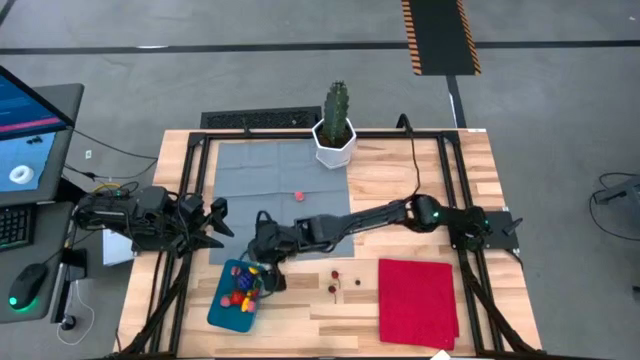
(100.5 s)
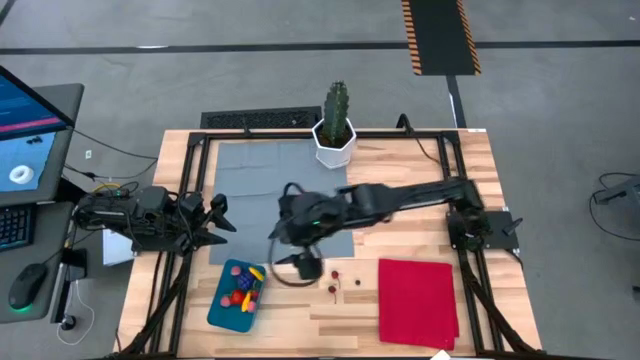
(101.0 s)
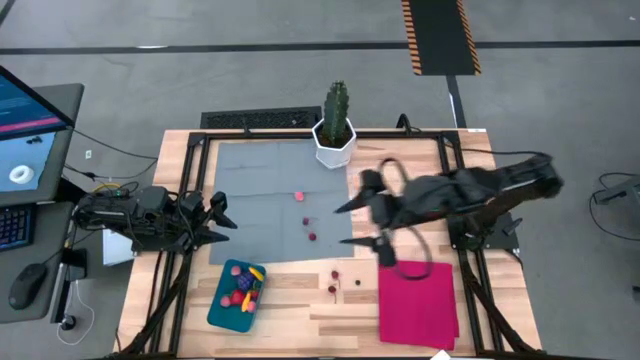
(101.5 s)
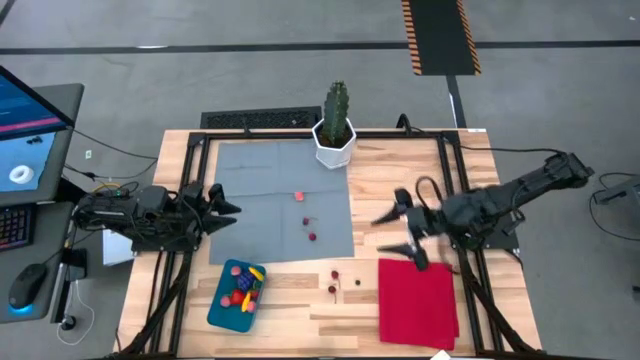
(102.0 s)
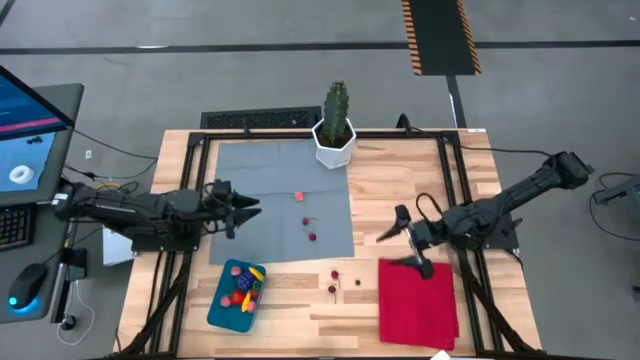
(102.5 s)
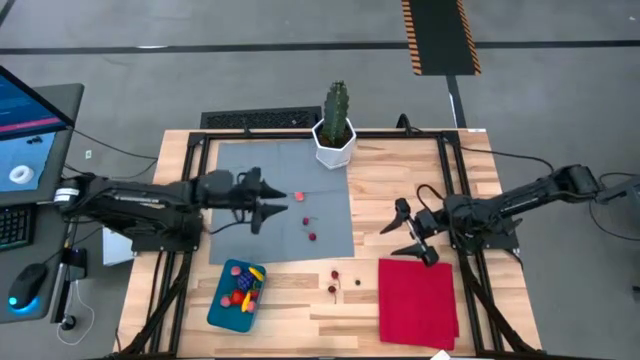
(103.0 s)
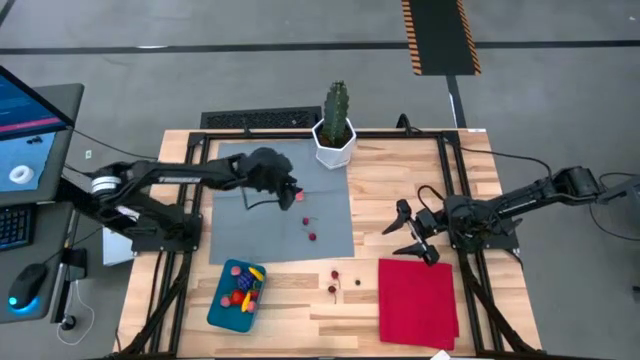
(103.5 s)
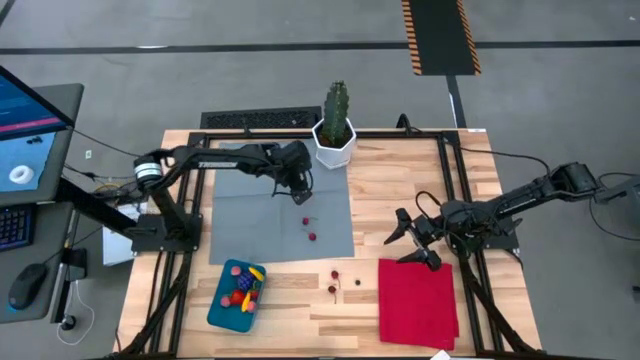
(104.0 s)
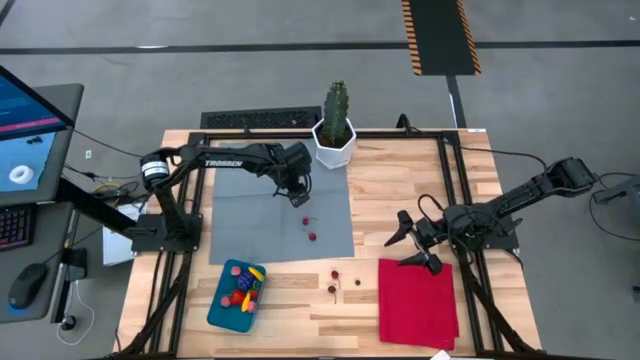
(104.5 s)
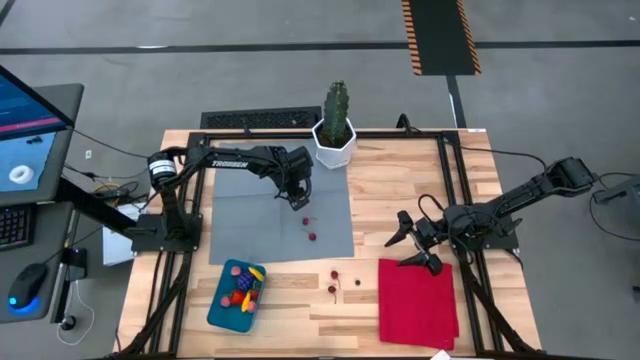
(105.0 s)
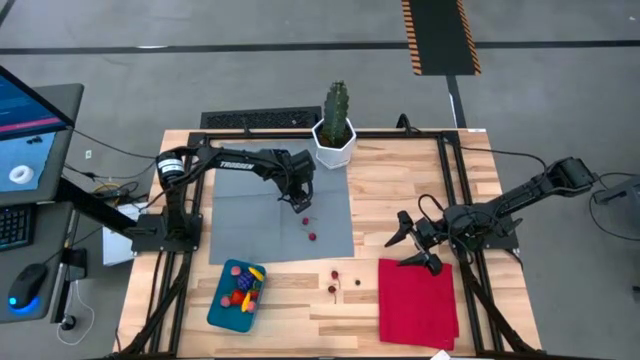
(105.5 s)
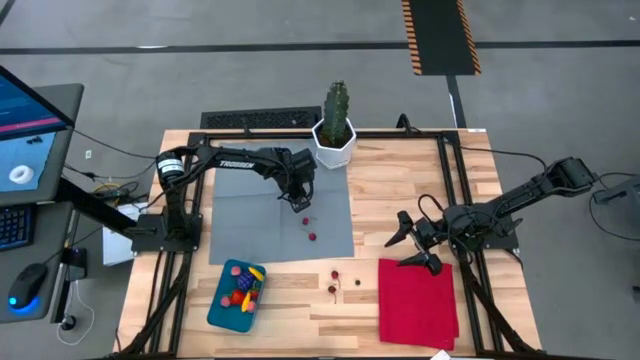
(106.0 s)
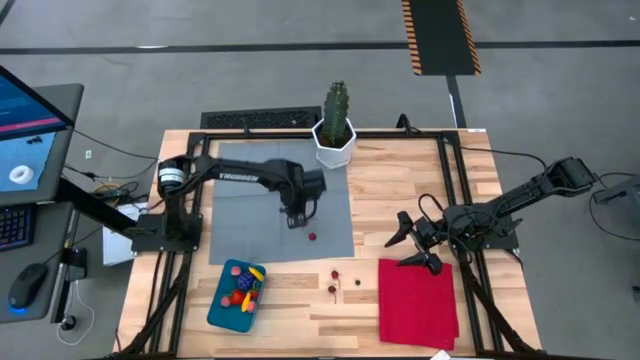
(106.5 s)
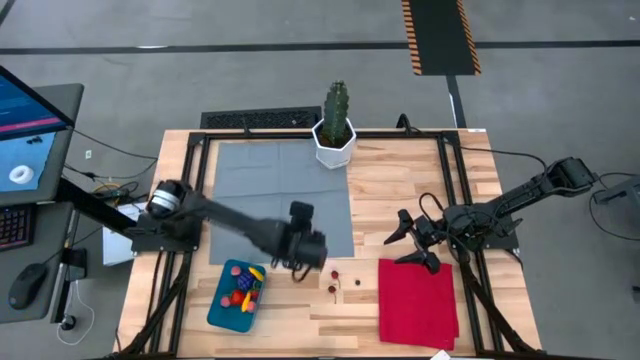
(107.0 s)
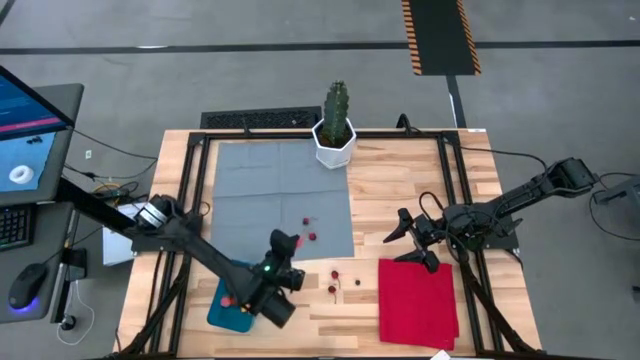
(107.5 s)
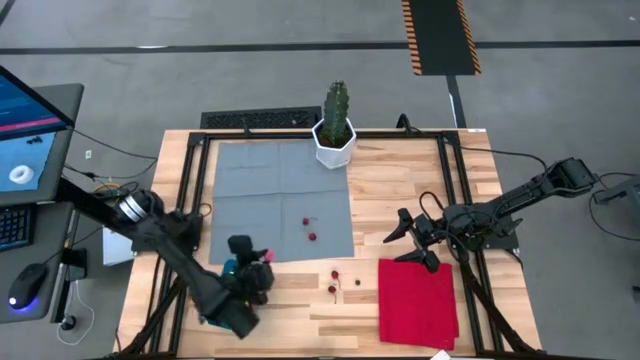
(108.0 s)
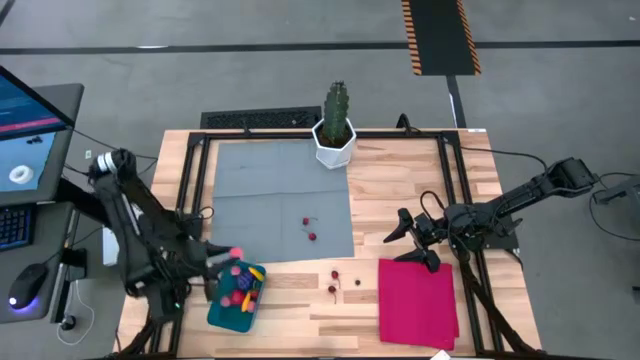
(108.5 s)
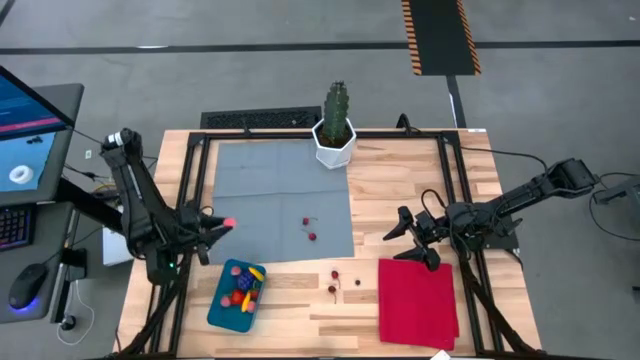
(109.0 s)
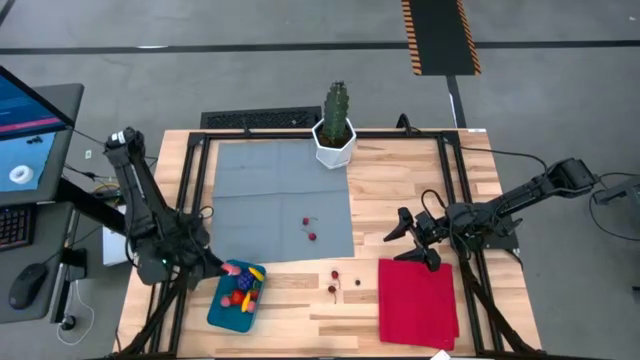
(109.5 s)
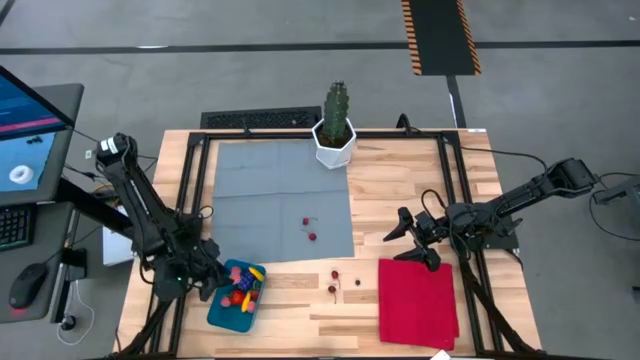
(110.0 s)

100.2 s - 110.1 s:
Task: Pick and placing Produce into tupperware
Put the peach into the blue bin

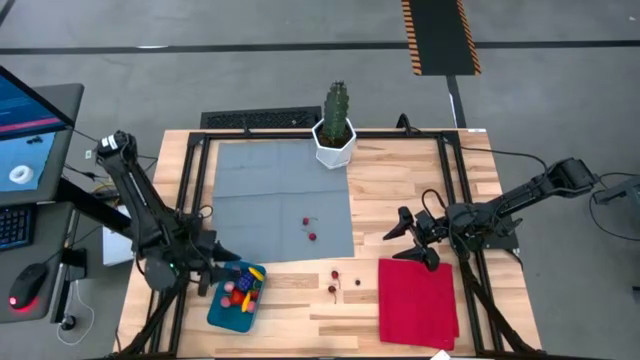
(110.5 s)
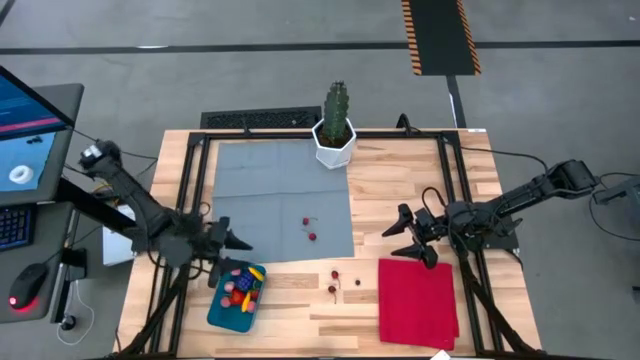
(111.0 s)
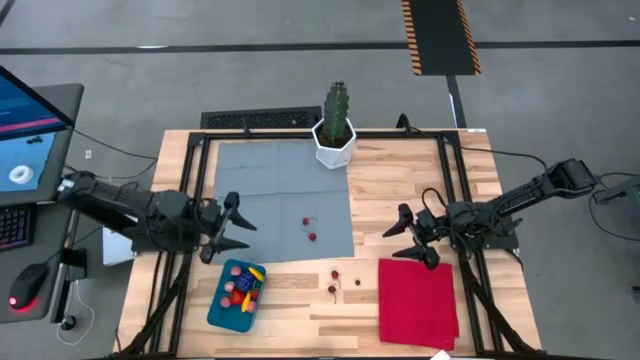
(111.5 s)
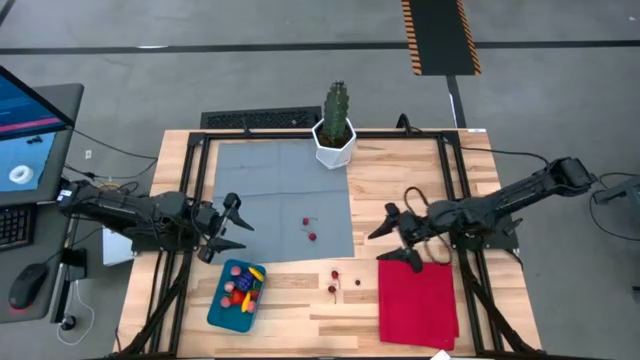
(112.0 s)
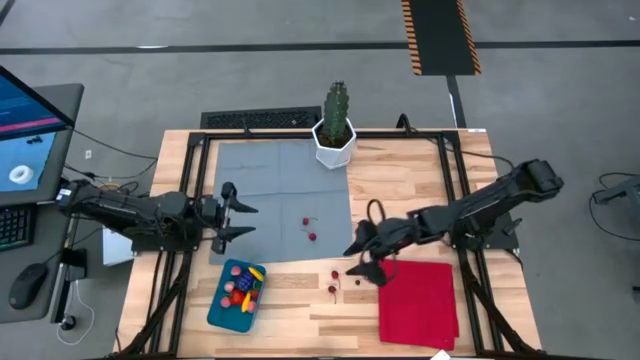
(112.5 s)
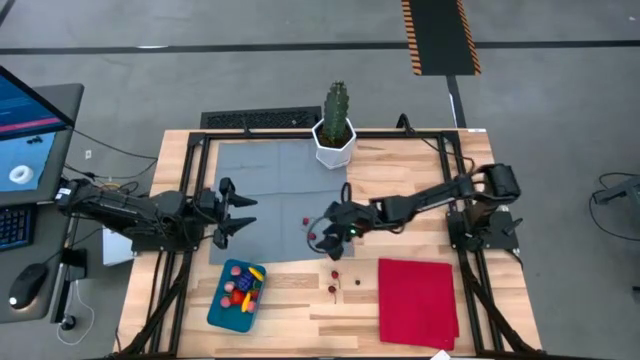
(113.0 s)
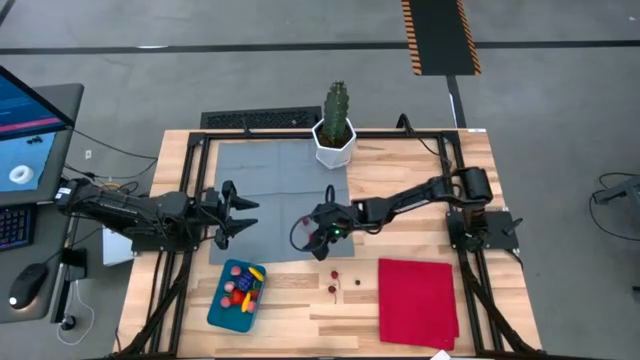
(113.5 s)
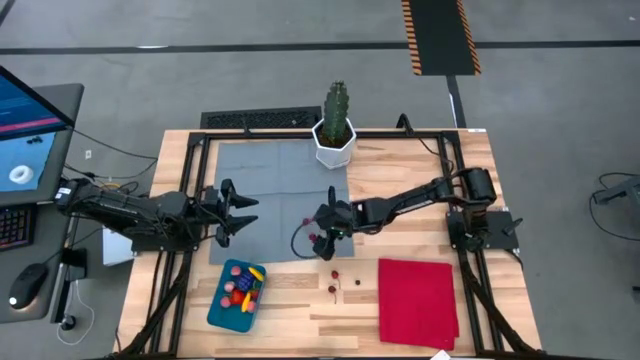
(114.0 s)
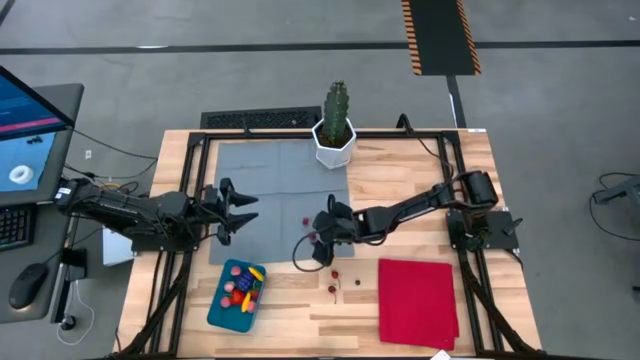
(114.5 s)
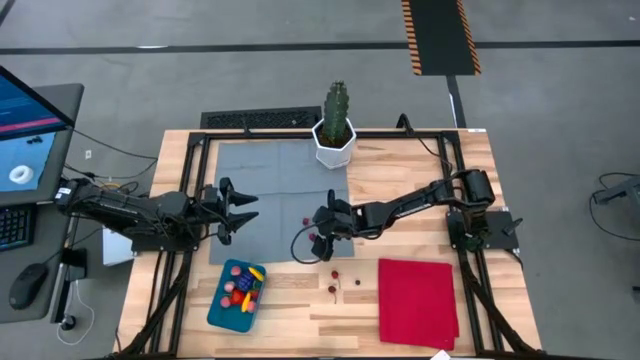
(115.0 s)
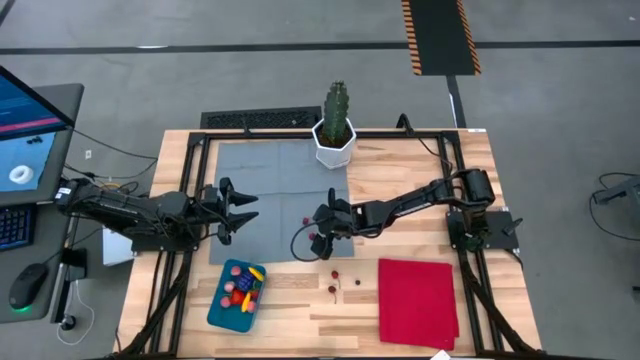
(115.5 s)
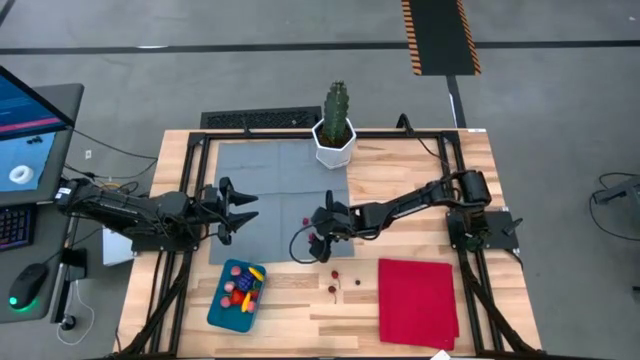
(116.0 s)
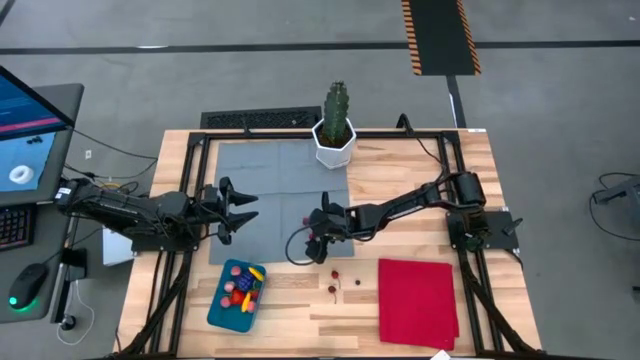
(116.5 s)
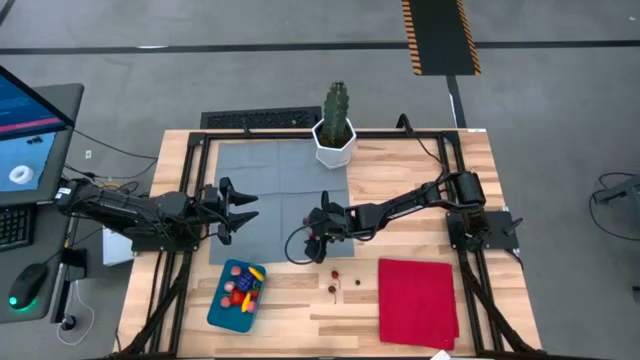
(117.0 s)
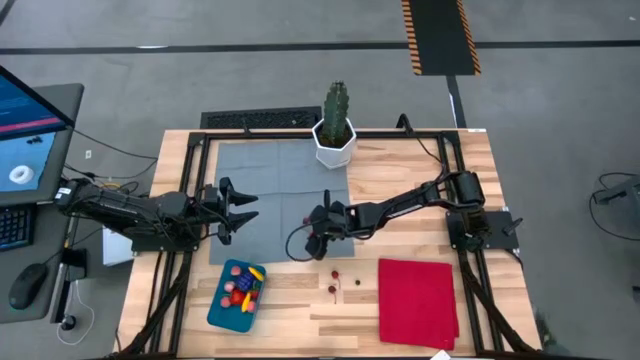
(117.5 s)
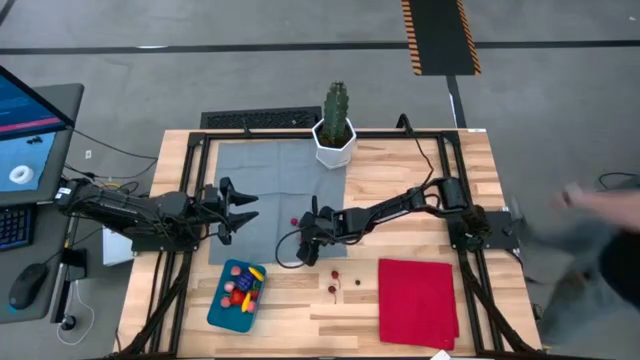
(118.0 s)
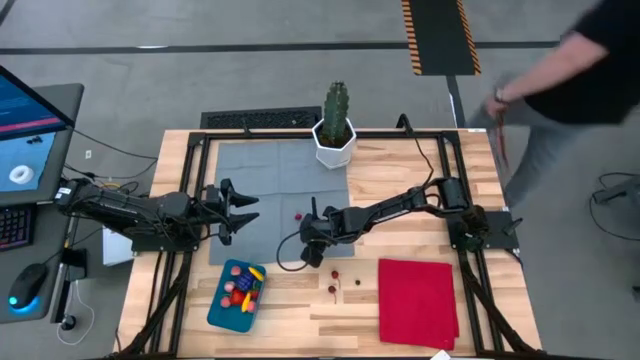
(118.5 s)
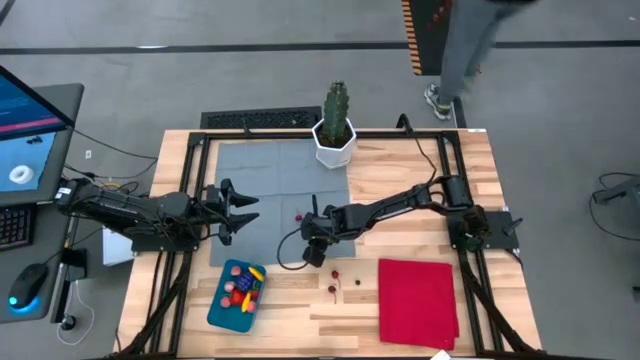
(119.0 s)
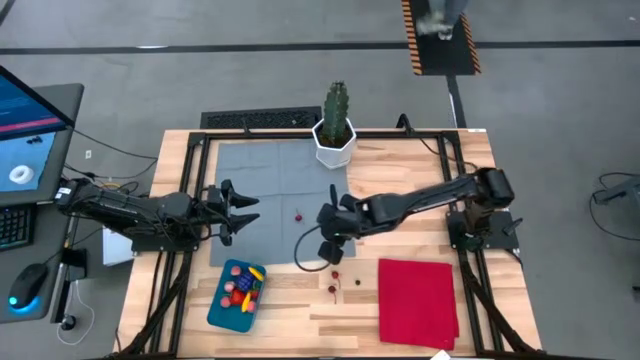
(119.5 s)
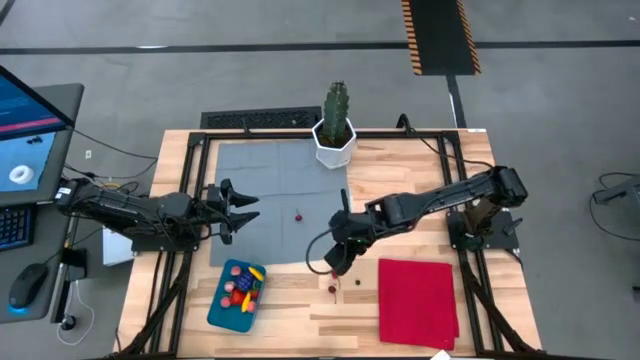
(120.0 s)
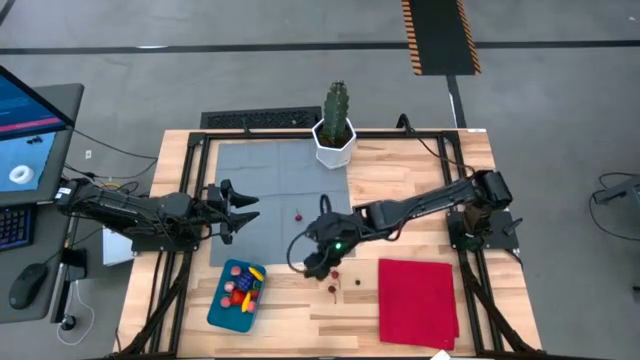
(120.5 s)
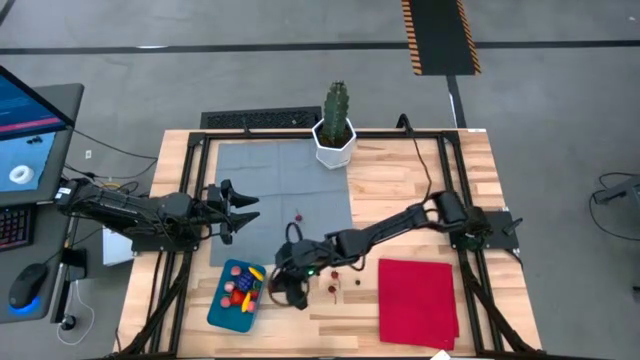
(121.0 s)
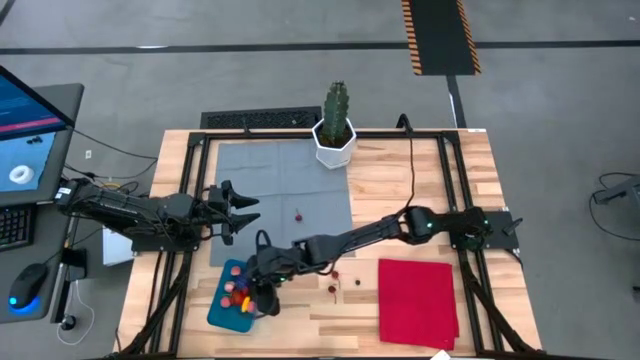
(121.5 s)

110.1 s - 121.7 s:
Put the cherry into the blue bin

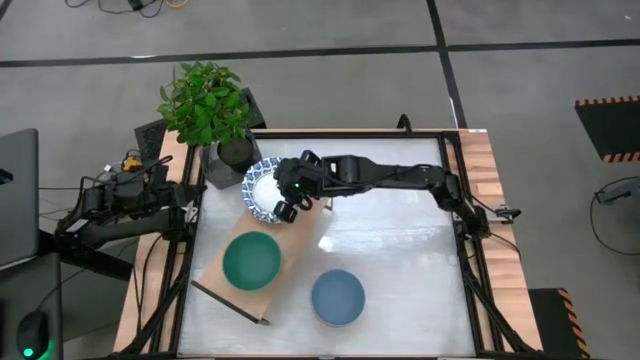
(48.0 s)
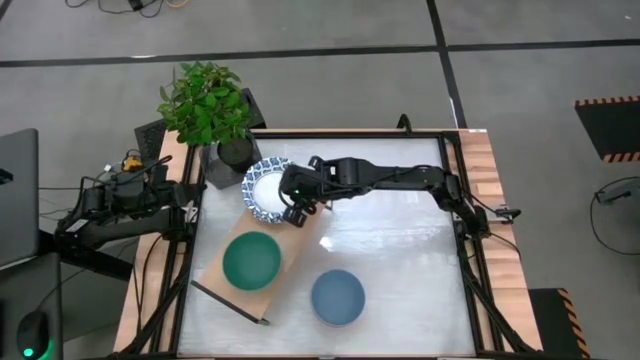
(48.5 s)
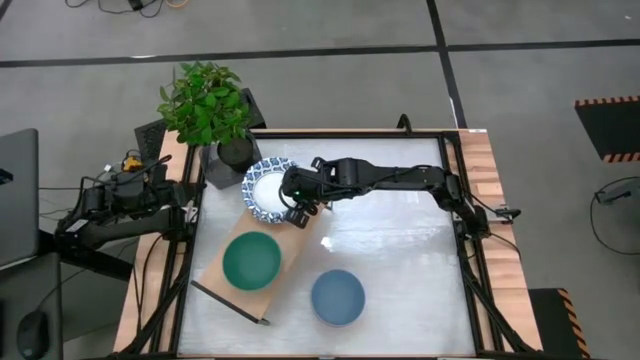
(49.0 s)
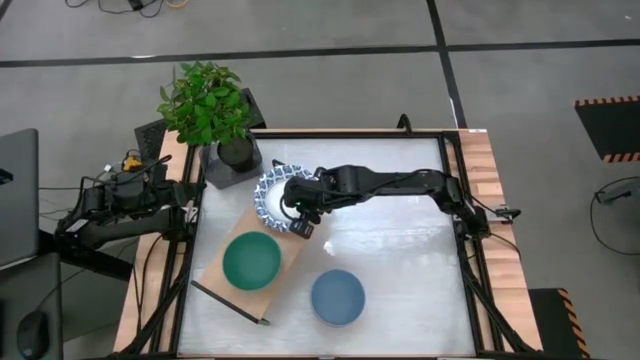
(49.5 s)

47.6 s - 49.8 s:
Task: Place and stack bowls onto a shelf
Adjust the white patterned bowl on the shelf
